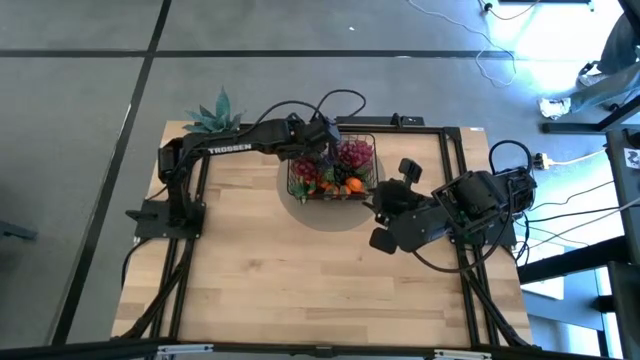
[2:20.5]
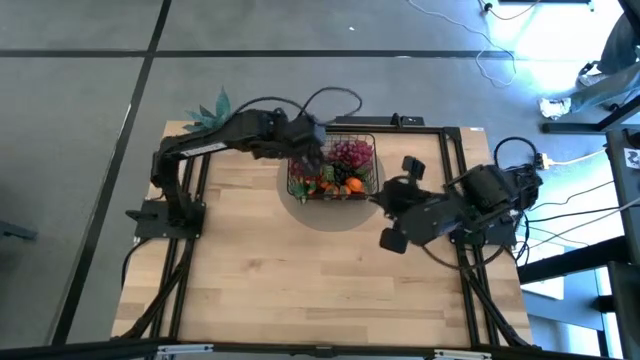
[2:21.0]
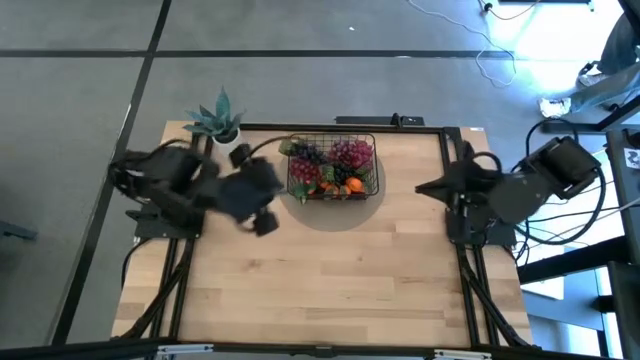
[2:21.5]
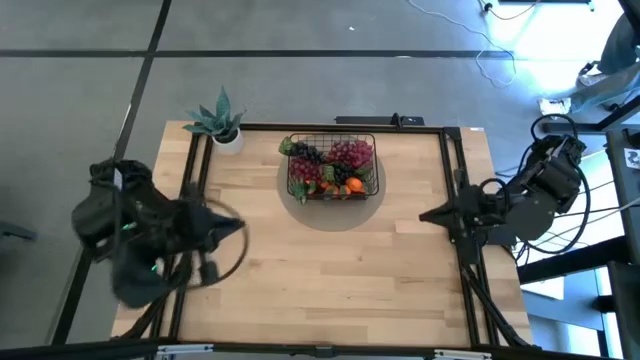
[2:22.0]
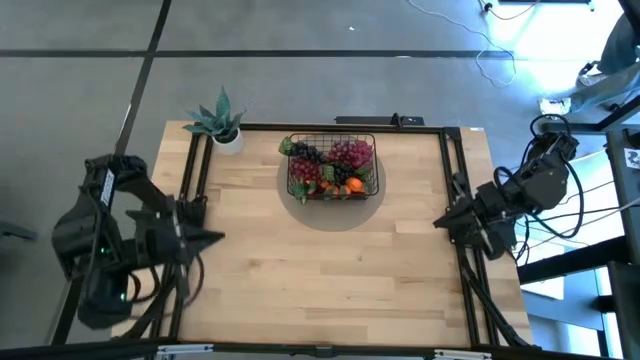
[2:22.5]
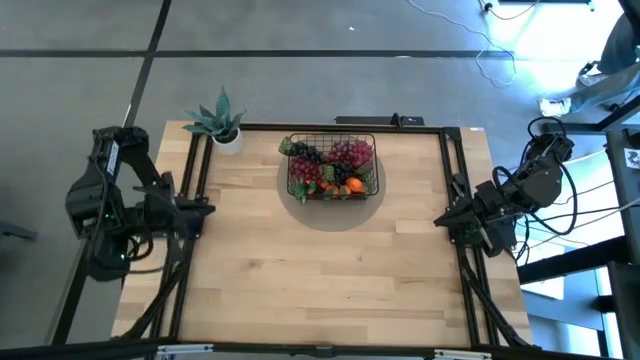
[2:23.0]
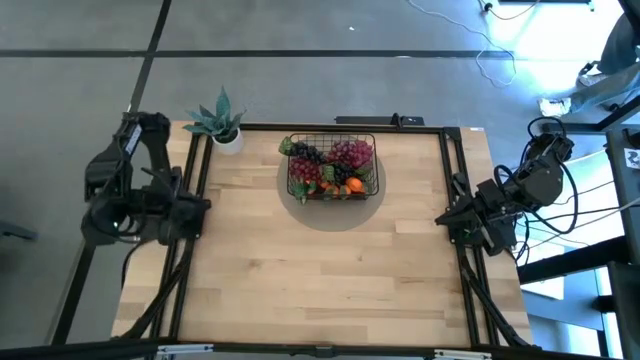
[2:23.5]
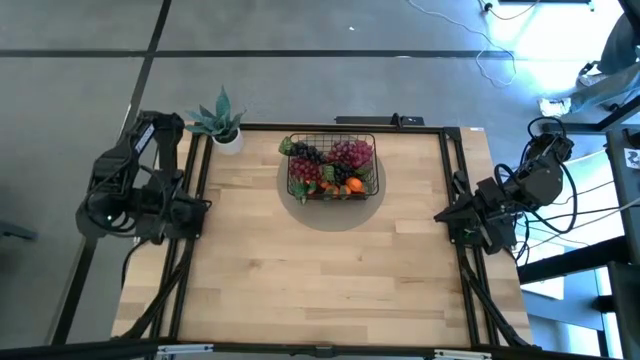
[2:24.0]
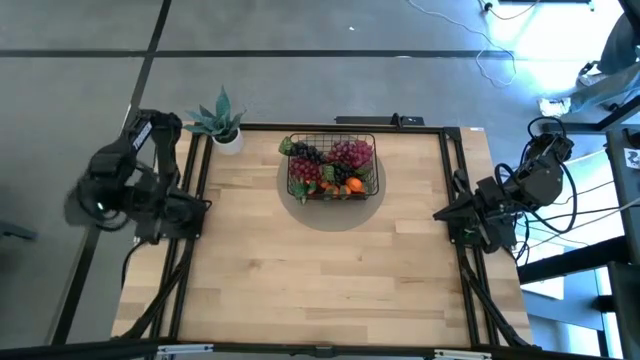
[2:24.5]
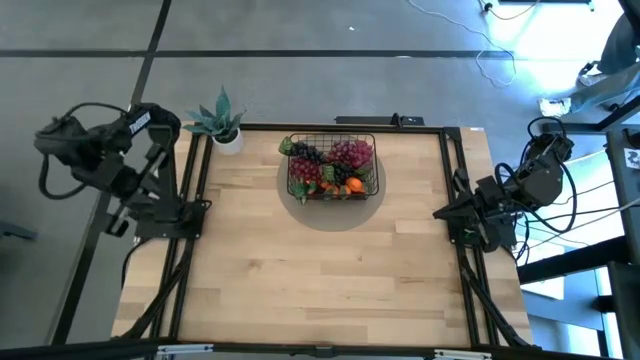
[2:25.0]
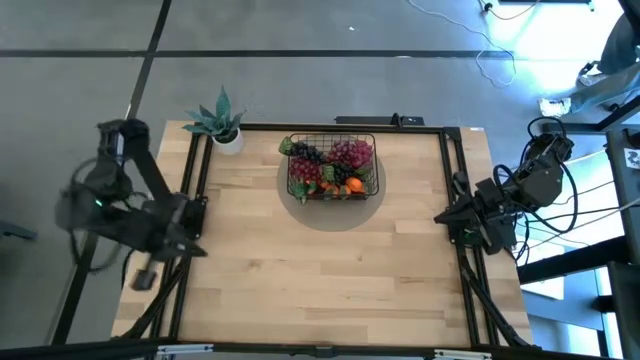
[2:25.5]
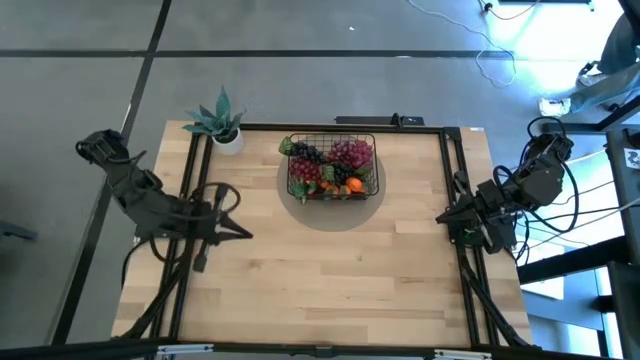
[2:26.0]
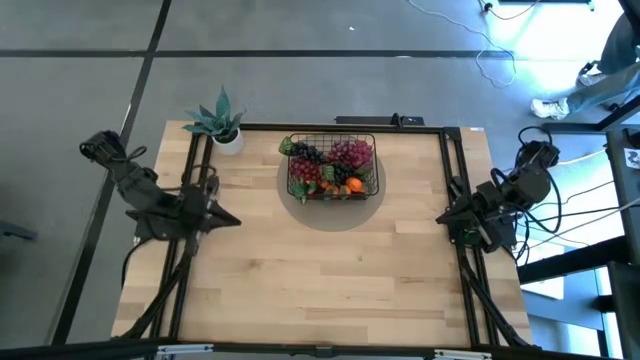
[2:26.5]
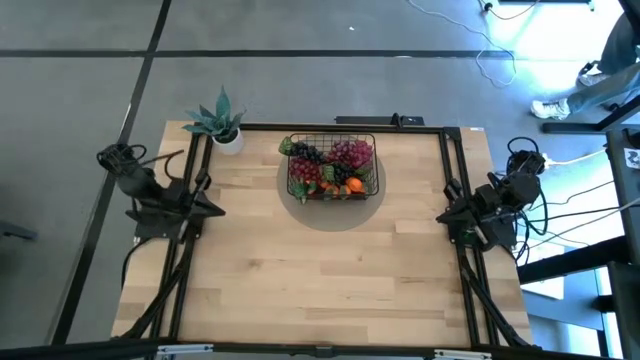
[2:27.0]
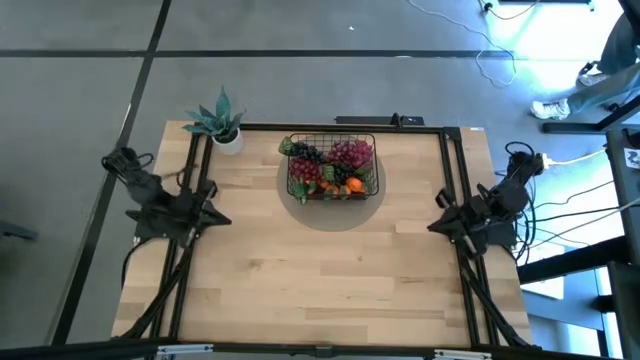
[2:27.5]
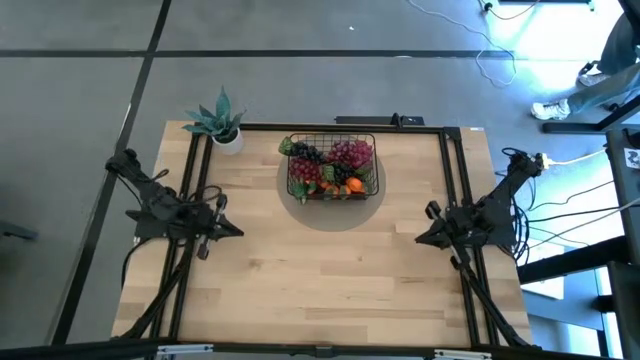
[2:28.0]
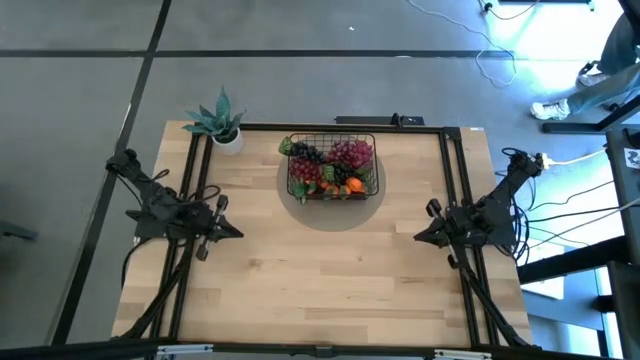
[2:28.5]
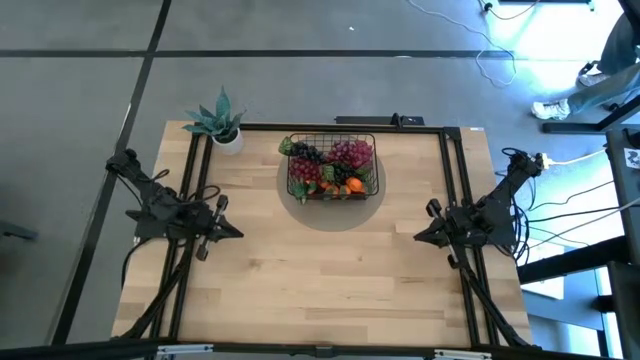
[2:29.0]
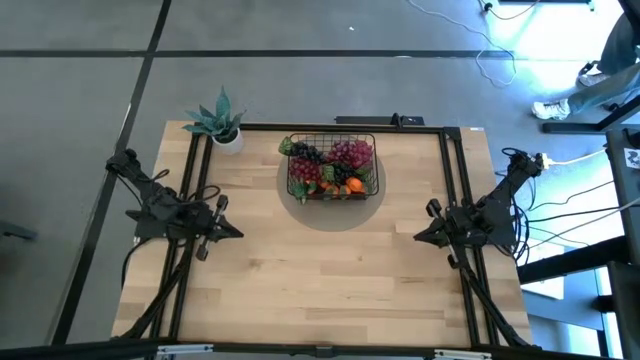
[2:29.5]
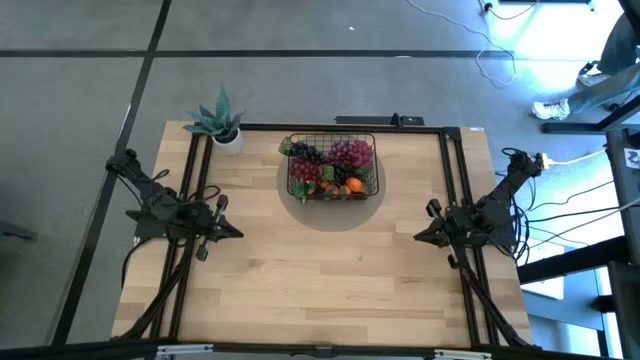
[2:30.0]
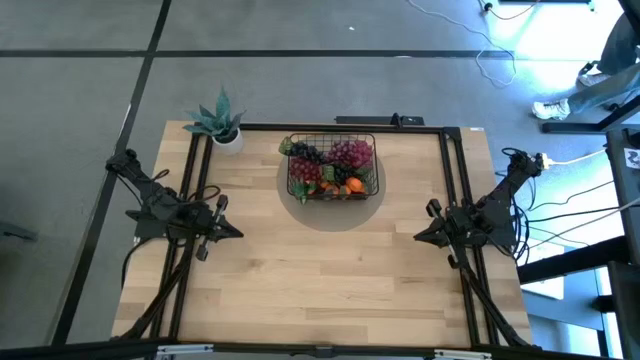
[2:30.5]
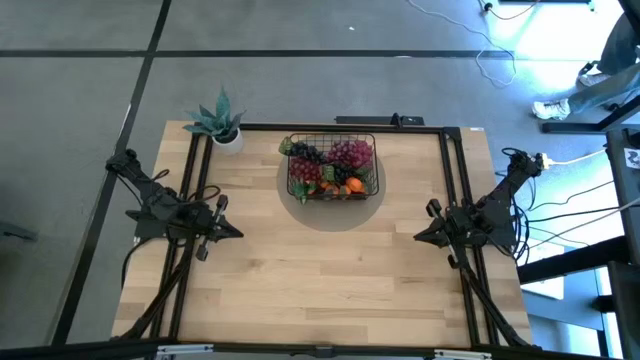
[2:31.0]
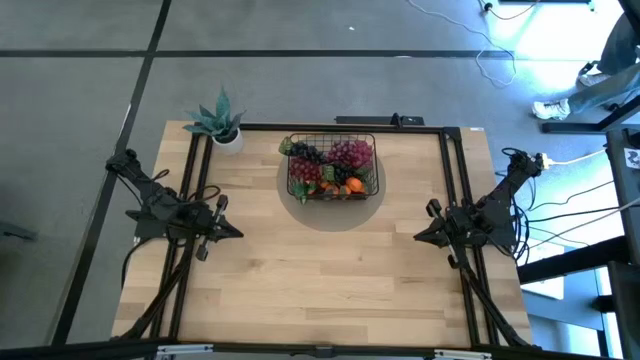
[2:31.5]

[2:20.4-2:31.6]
Task: Build produce basket
Return to Home Position

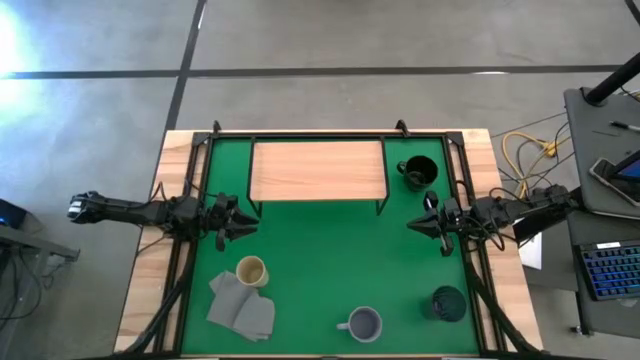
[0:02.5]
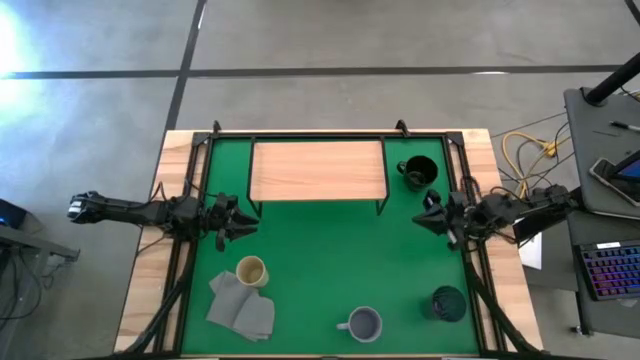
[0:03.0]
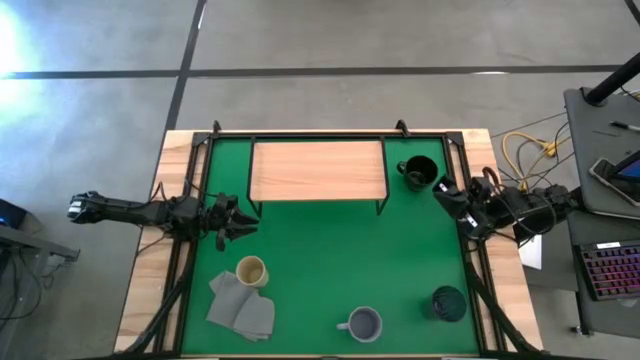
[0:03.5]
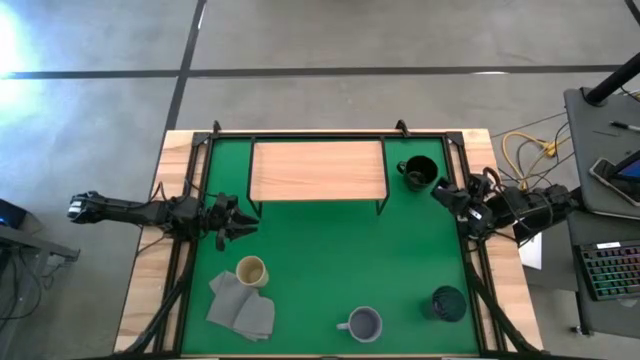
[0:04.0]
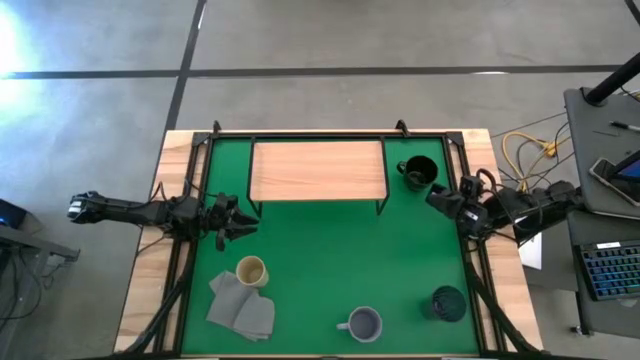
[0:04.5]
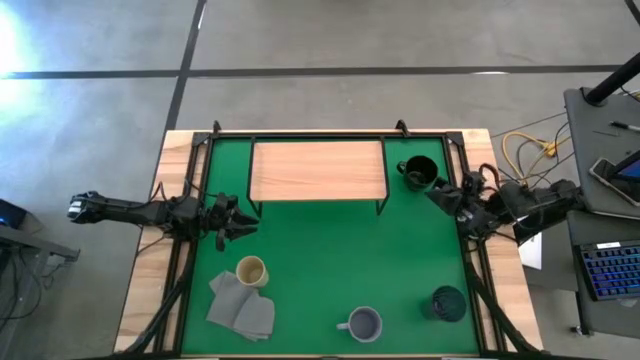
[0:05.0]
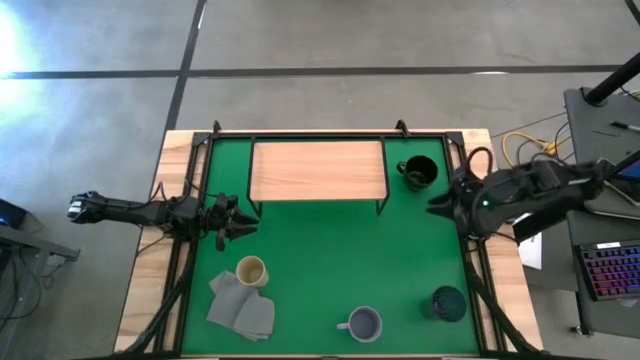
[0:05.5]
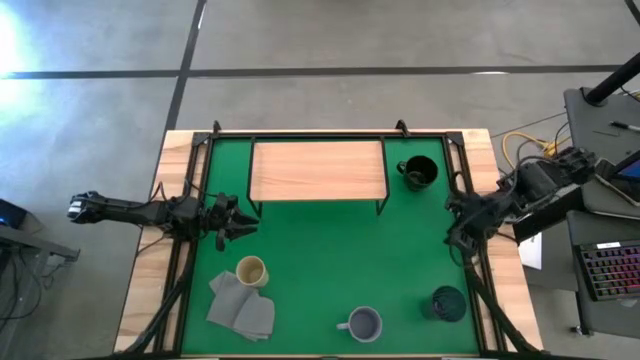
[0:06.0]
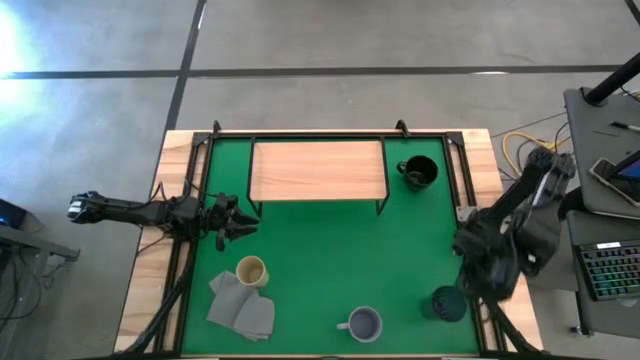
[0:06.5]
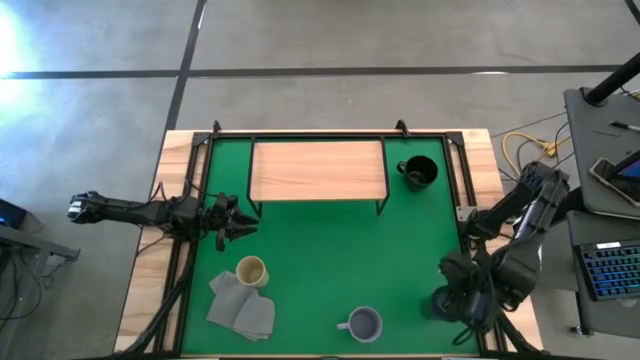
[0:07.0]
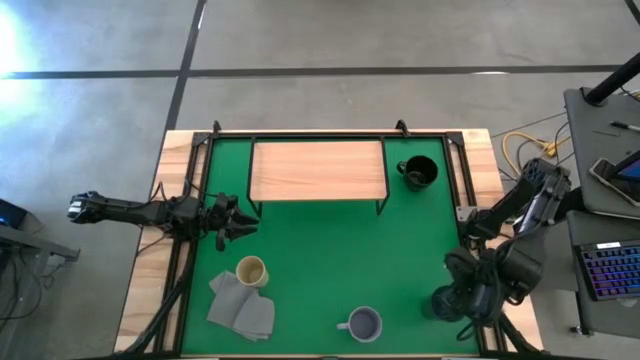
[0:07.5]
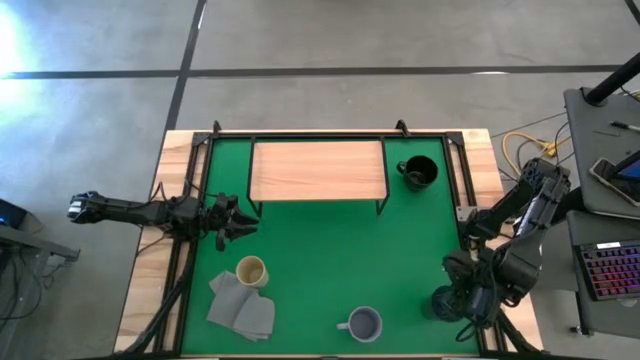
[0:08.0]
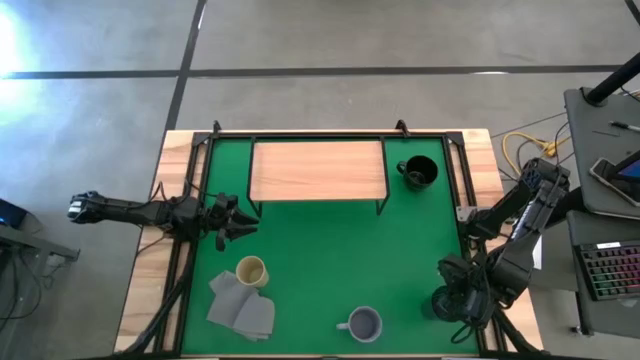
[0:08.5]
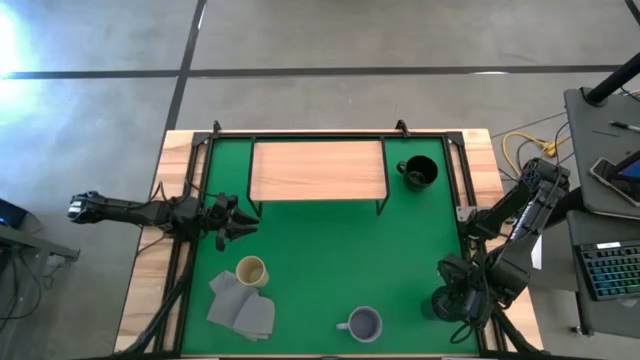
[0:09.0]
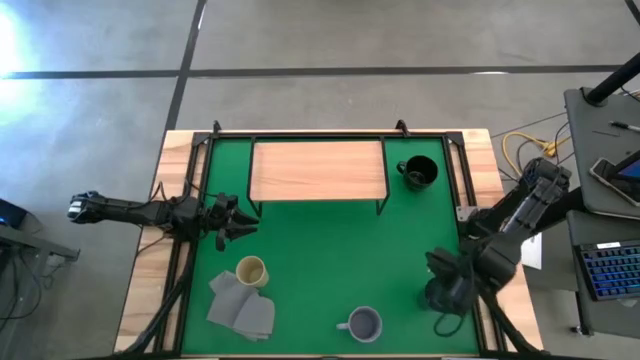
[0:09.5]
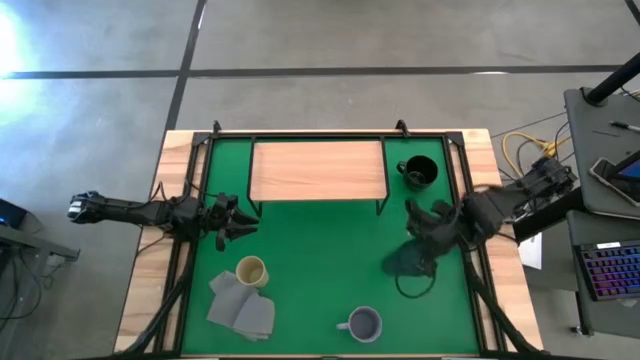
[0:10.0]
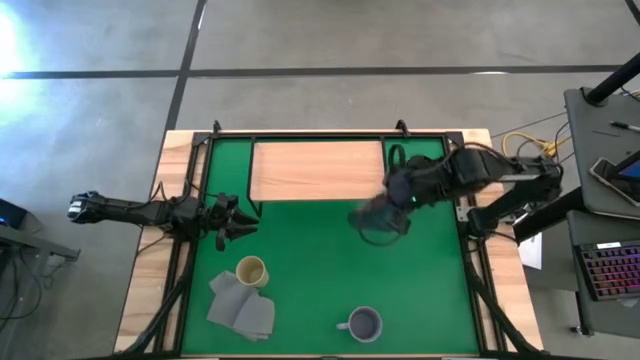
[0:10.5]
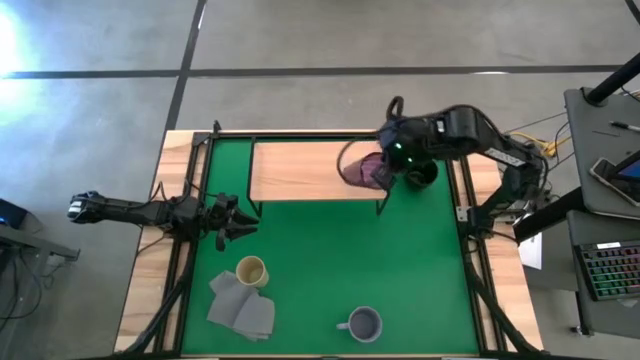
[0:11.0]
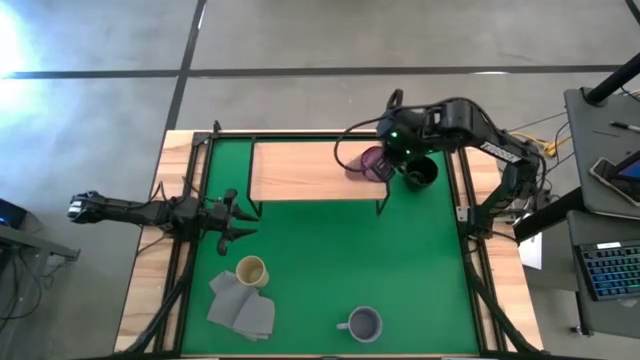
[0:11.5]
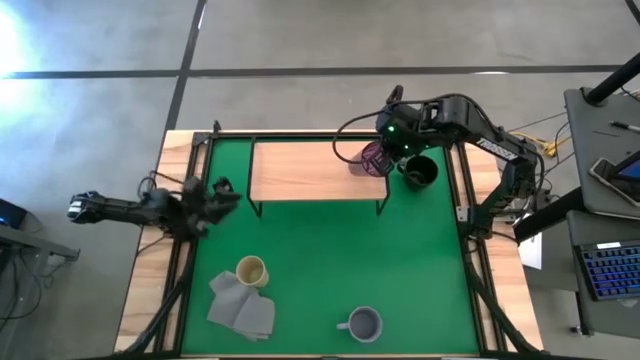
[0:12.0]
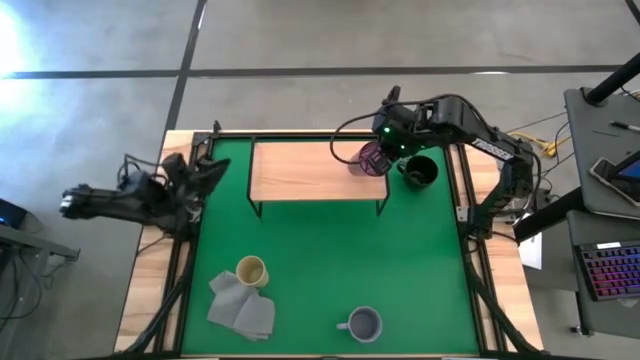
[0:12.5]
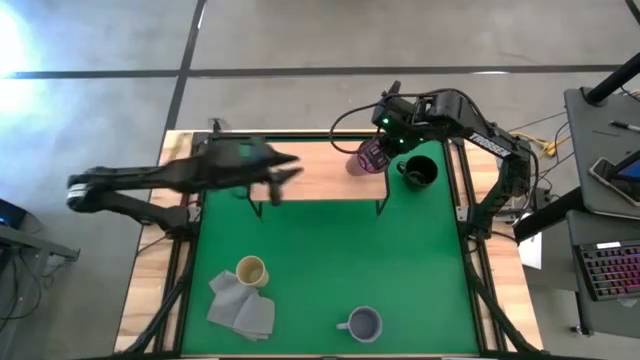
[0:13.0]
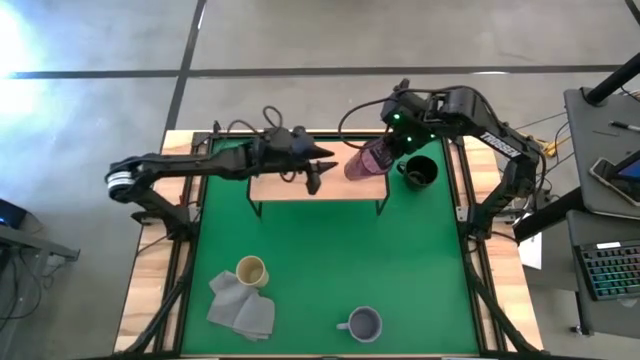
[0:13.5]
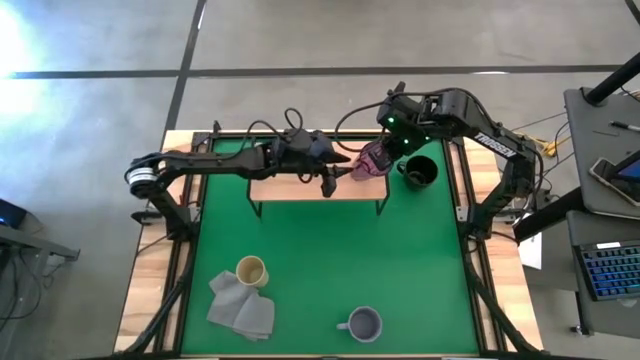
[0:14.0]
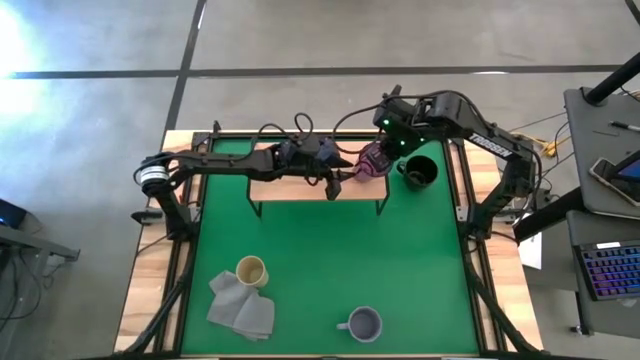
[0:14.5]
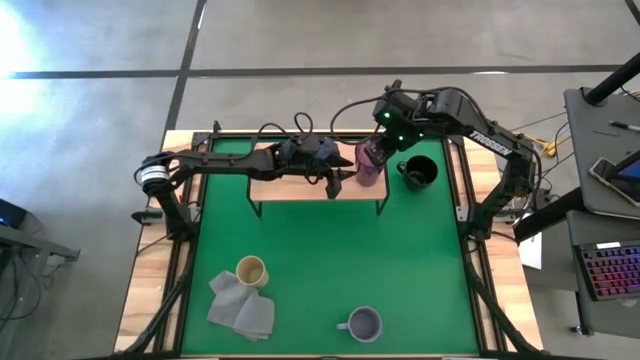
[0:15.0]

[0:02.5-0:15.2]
Task: Stack small to large cups/mugs on shelf
Put the purple cup on the shelf
